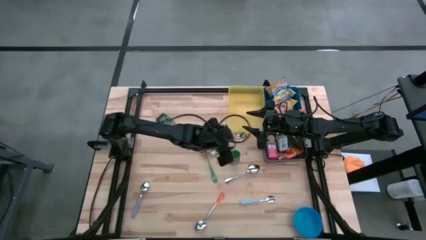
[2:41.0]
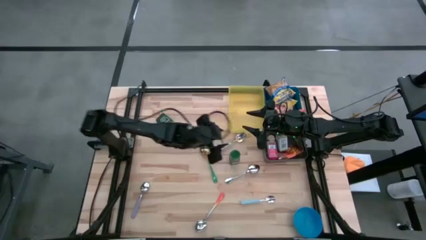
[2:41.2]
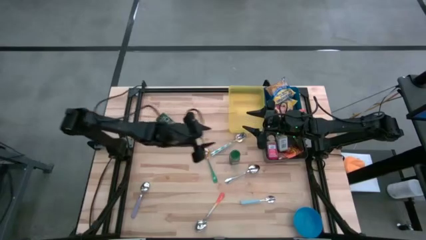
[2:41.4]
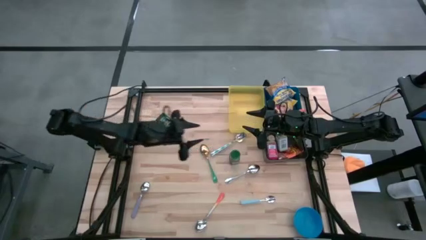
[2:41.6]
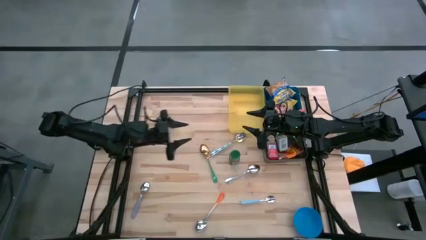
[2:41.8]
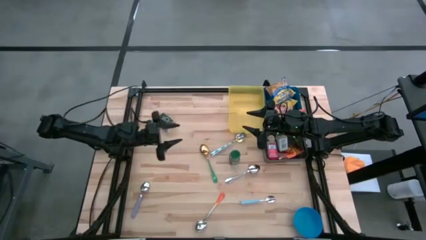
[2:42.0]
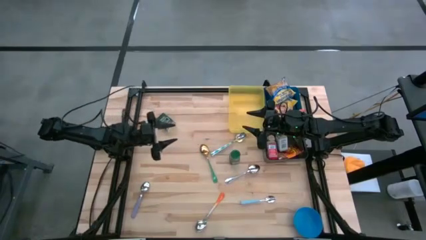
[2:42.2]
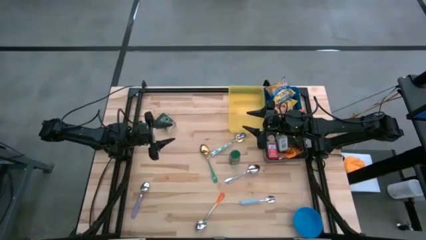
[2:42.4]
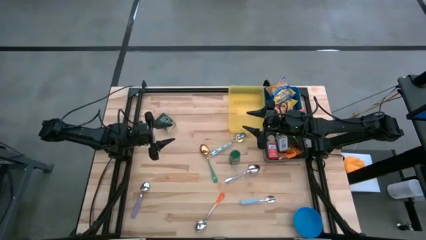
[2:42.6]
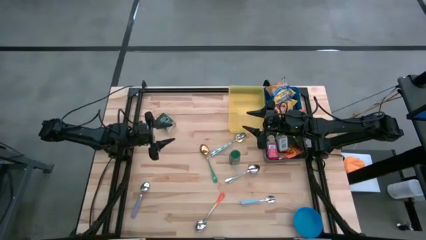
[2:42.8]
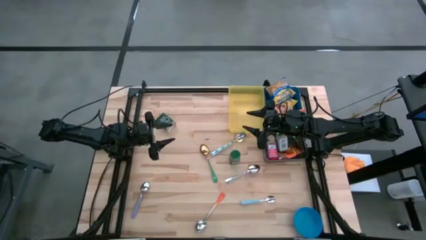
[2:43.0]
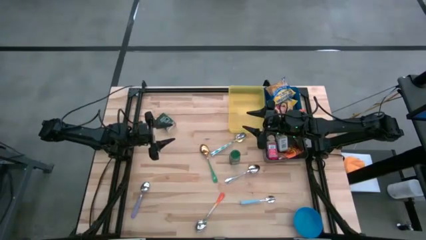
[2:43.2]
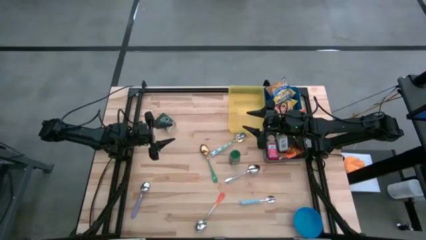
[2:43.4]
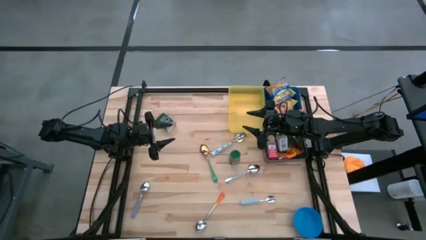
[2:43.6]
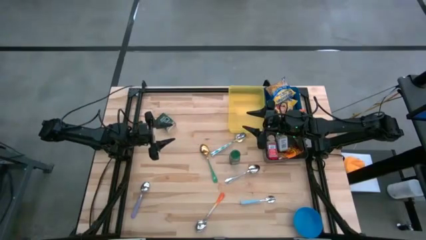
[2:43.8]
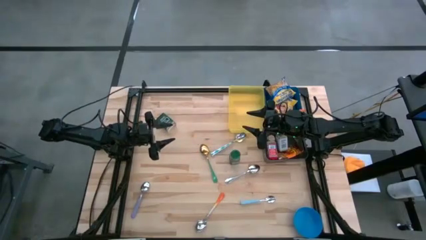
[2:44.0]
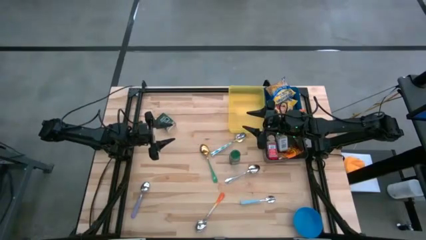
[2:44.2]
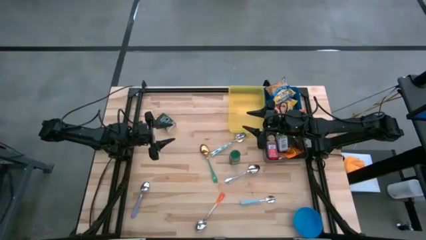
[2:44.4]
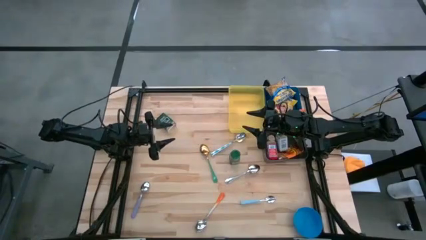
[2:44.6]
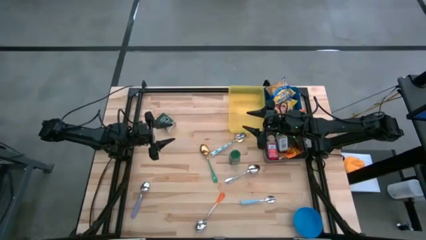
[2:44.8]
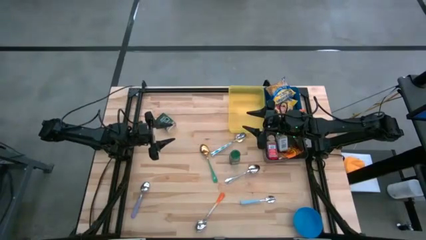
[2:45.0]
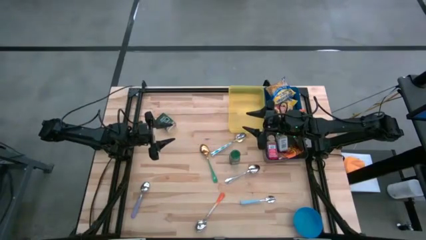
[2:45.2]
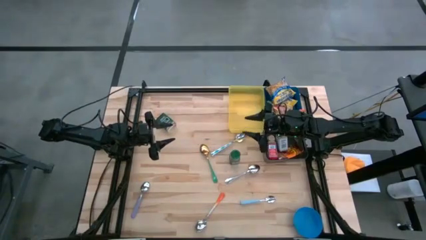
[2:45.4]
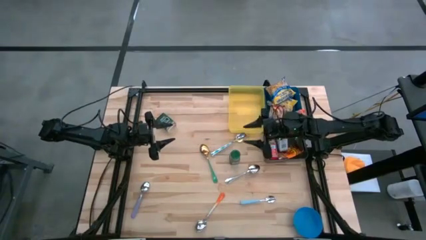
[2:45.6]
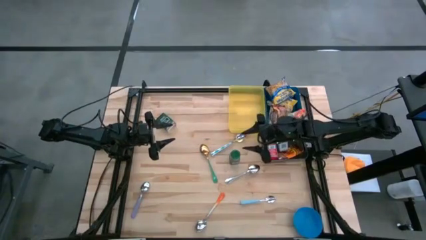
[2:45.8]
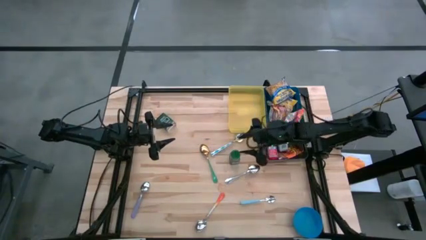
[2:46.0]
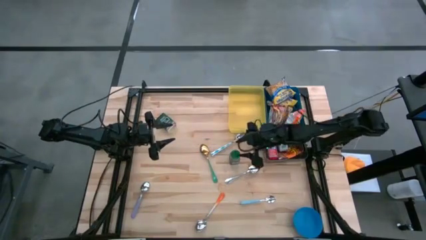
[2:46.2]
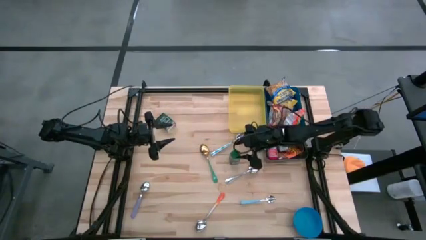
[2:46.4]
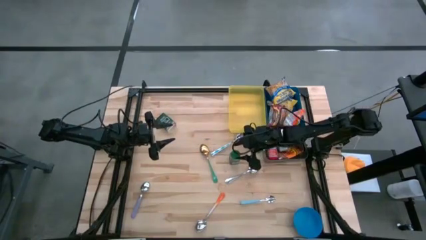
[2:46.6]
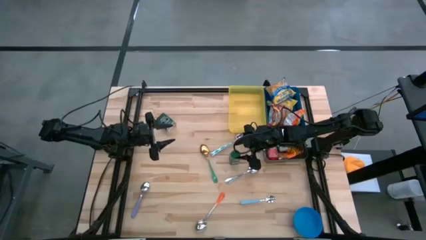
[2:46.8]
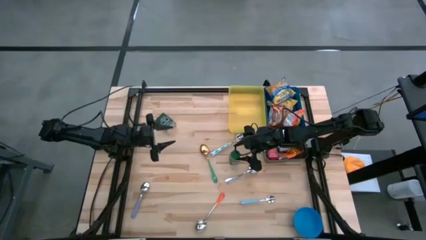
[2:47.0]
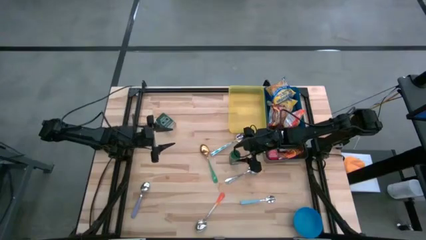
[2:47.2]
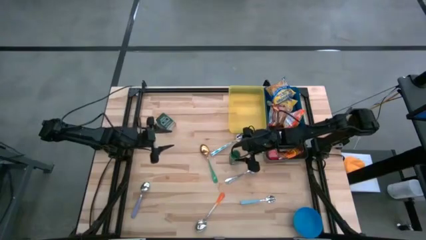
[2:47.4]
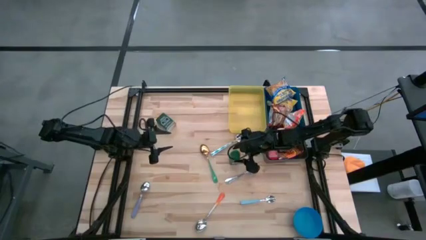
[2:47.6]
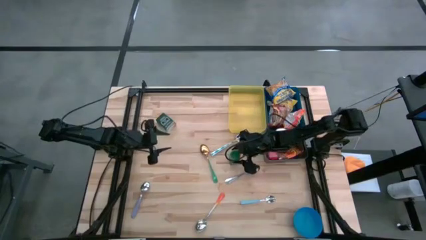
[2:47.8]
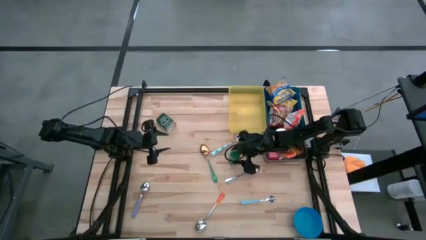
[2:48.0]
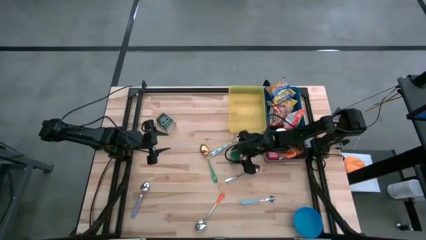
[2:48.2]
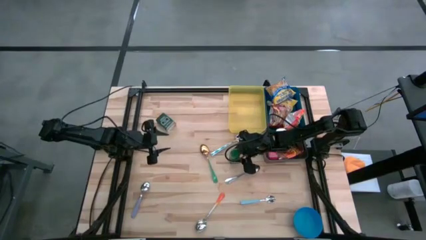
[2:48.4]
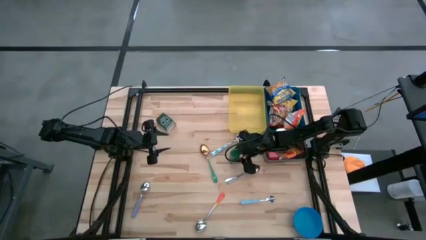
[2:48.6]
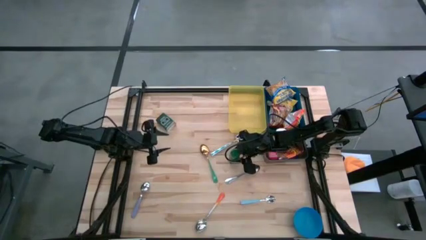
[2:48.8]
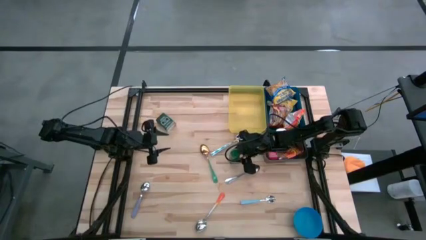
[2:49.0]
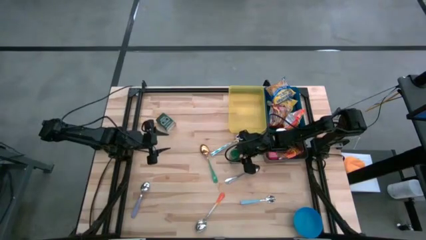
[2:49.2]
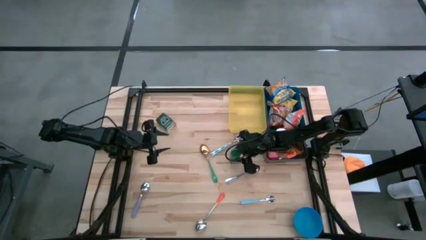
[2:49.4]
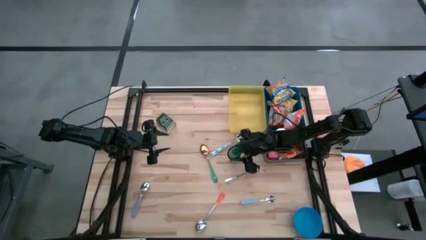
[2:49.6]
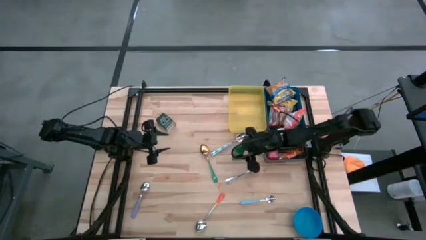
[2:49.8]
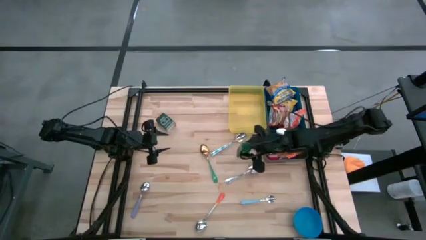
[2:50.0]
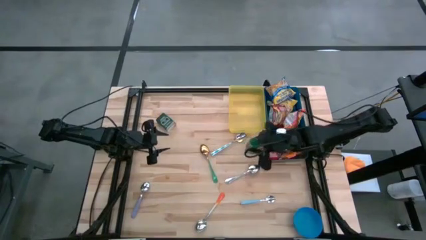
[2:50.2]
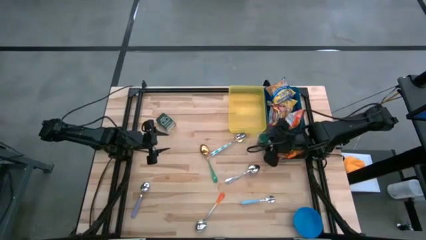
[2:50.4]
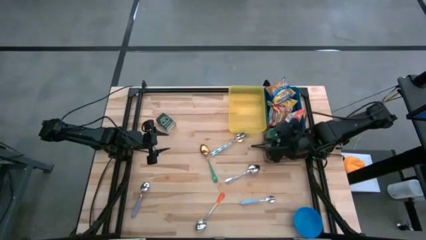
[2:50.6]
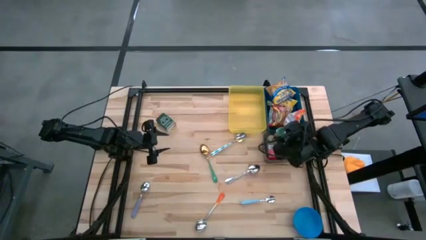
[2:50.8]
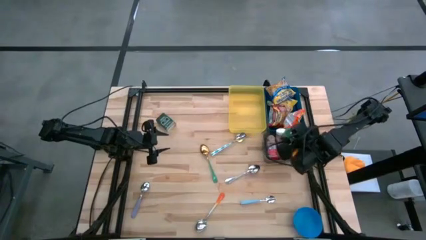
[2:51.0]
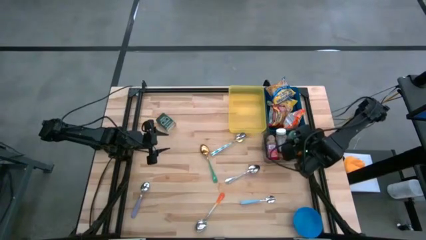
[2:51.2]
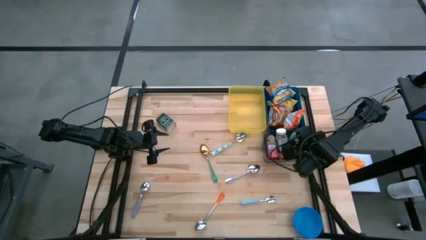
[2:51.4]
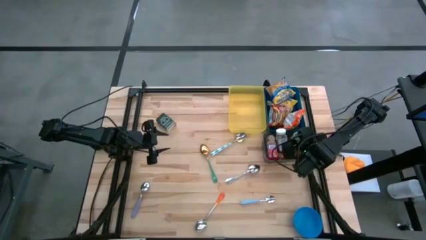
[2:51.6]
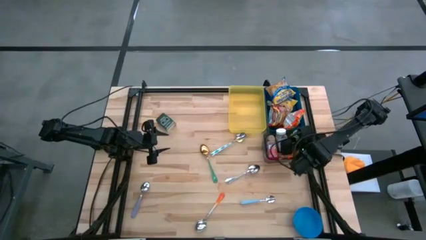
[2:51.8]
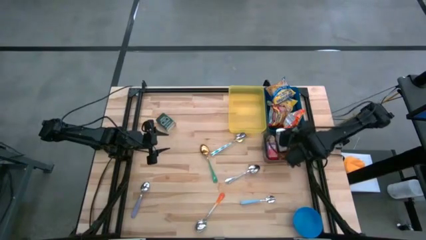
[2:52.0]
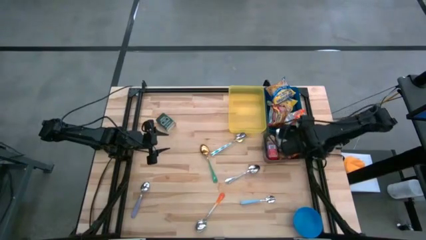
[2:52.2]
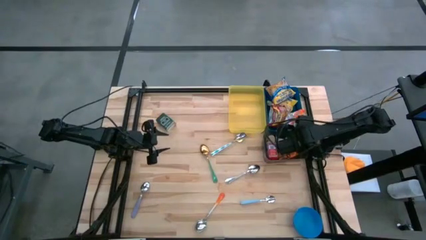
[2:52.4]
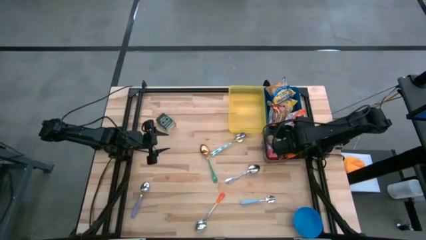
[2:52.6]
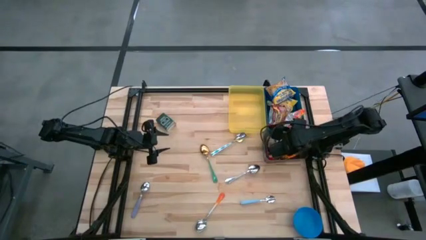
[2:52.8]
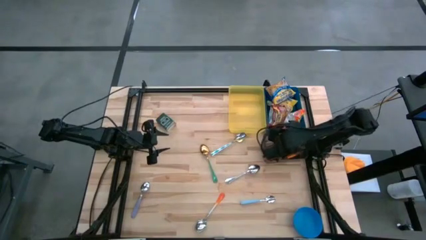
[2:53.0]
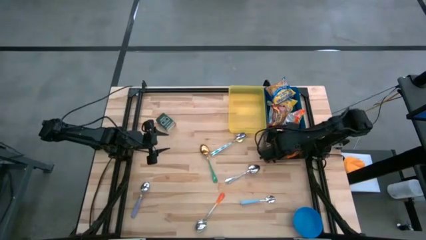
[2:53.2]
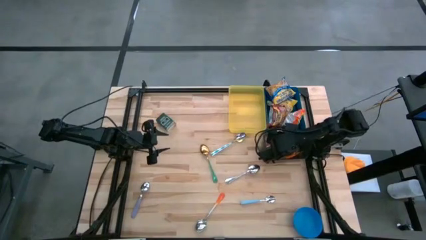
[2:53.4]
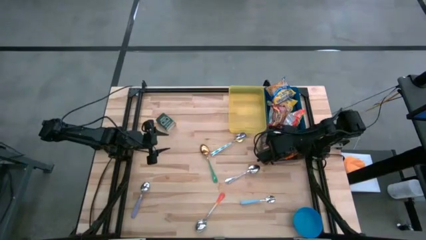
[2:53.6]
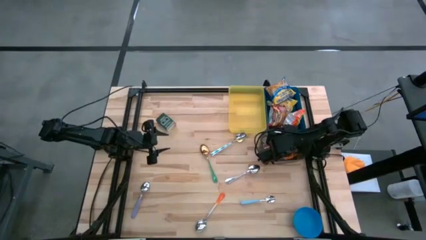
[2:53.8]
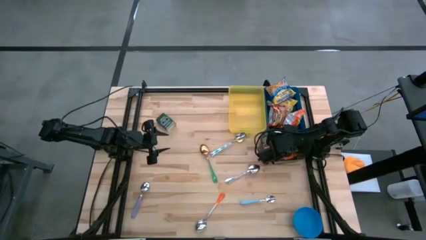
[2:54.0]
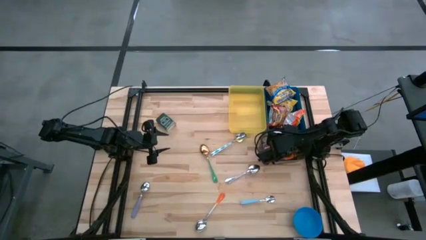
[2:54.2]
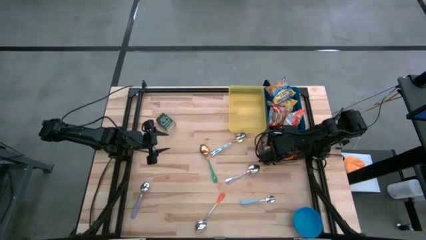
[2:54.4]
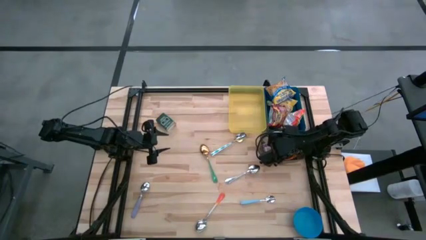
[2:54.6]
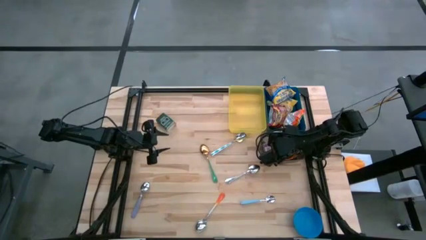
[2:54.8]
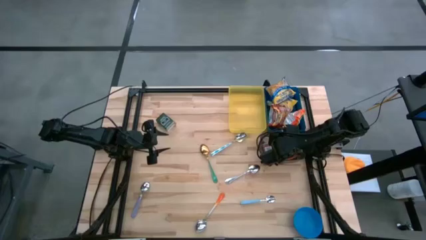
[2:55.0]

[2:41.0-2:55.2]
Put the green seasoning bottle into the black bin
